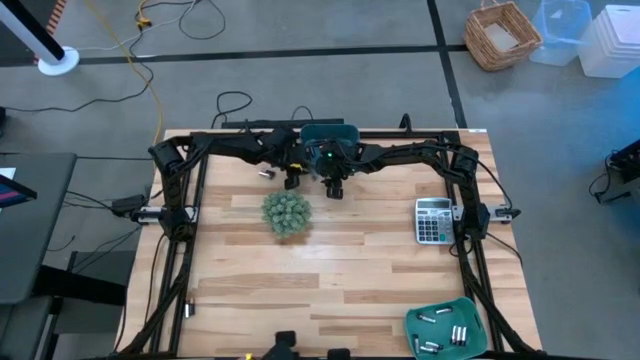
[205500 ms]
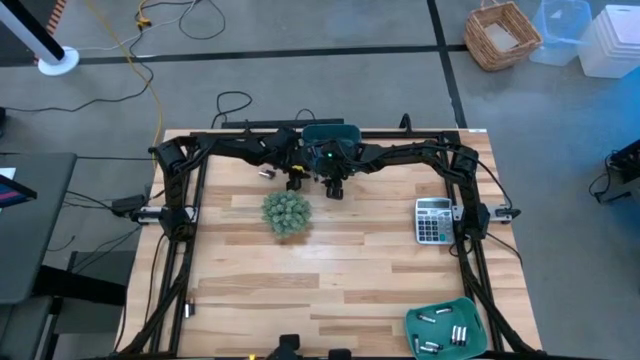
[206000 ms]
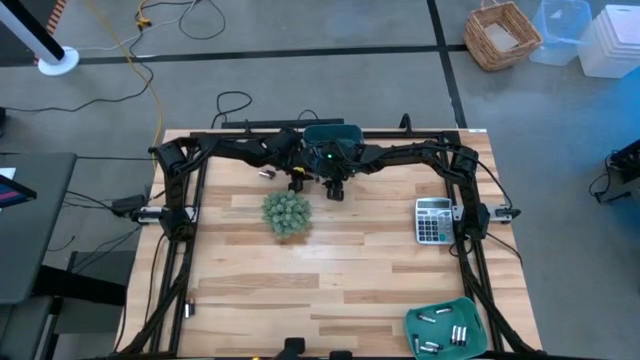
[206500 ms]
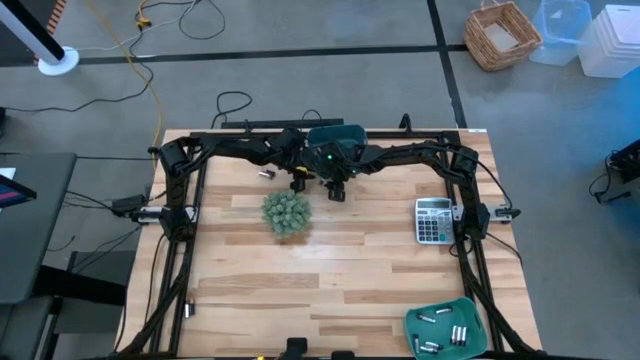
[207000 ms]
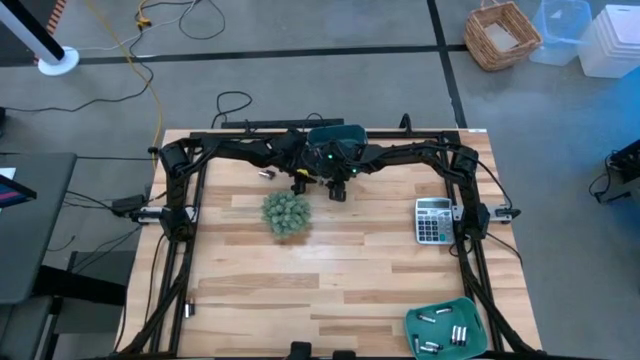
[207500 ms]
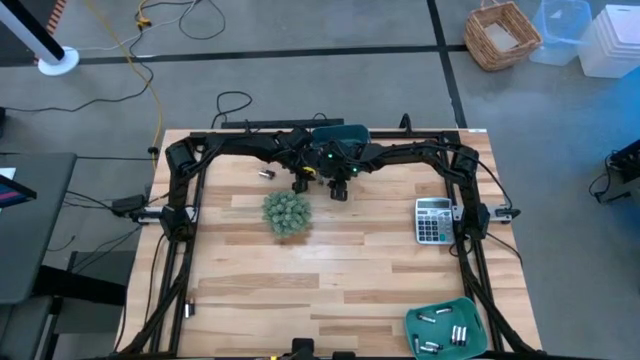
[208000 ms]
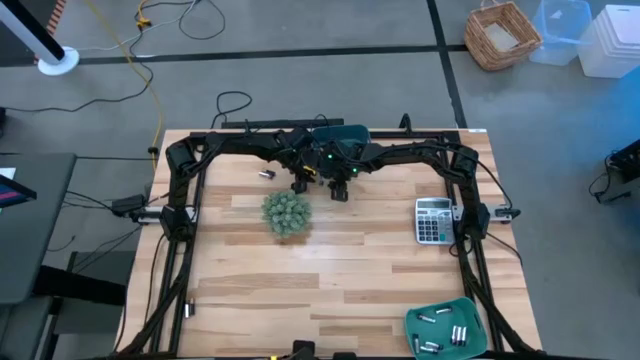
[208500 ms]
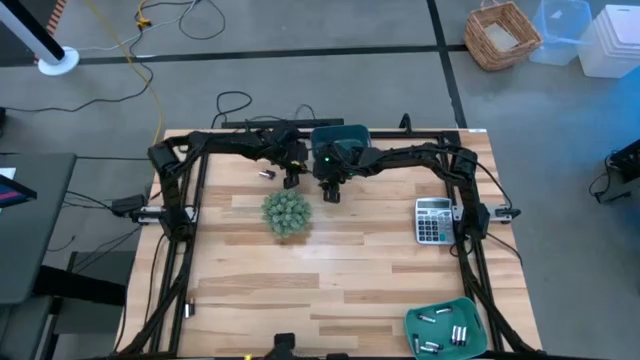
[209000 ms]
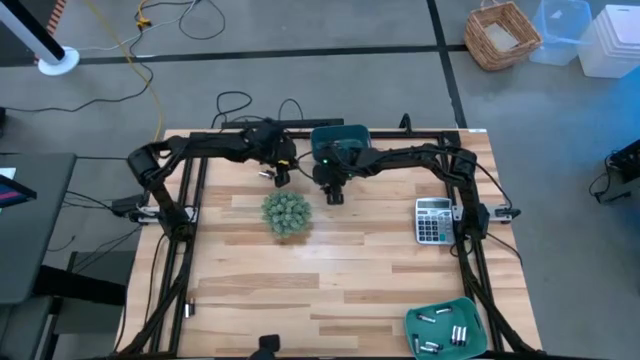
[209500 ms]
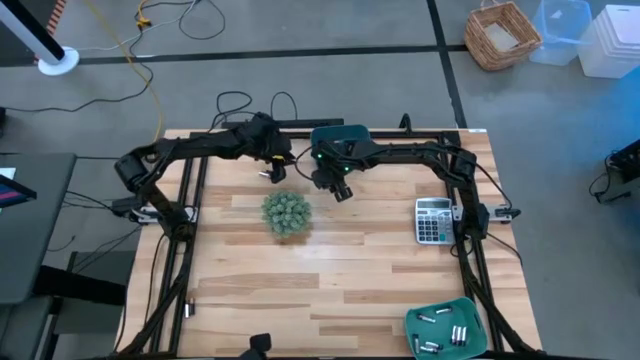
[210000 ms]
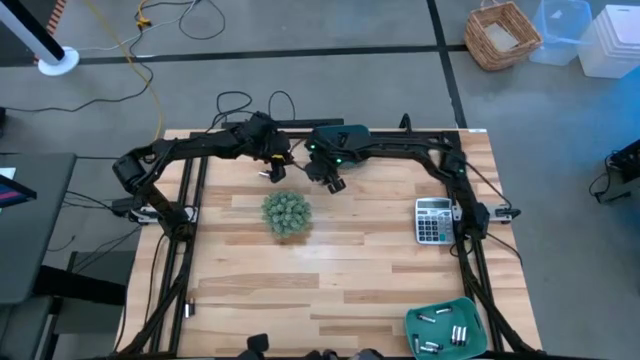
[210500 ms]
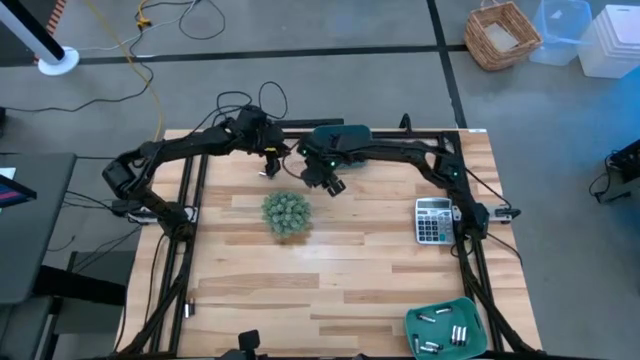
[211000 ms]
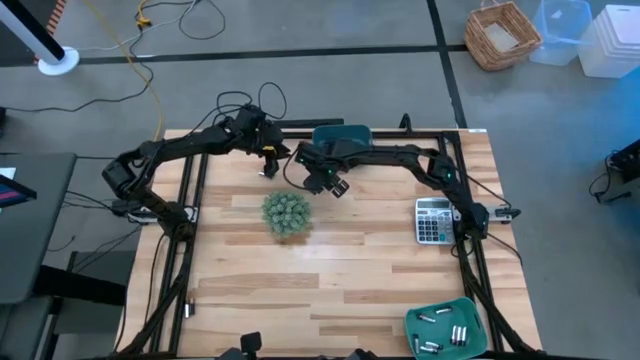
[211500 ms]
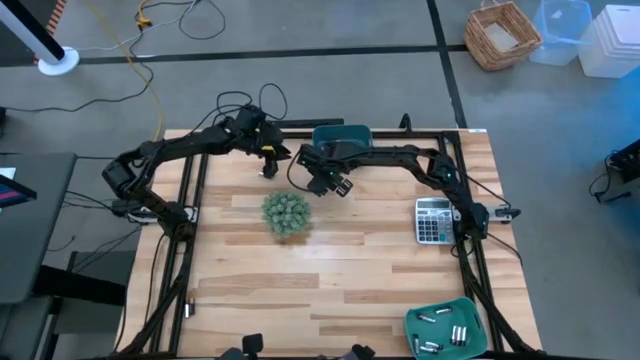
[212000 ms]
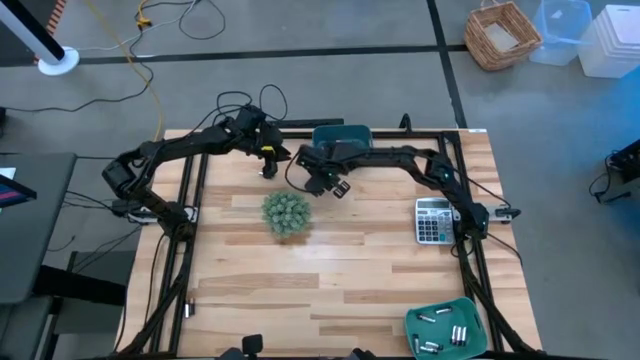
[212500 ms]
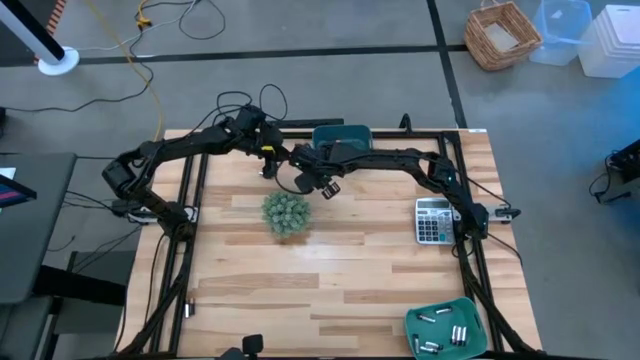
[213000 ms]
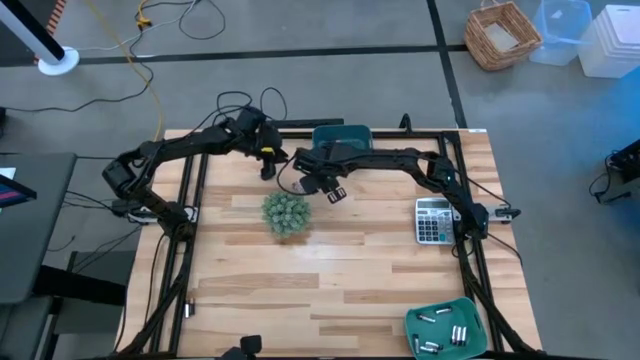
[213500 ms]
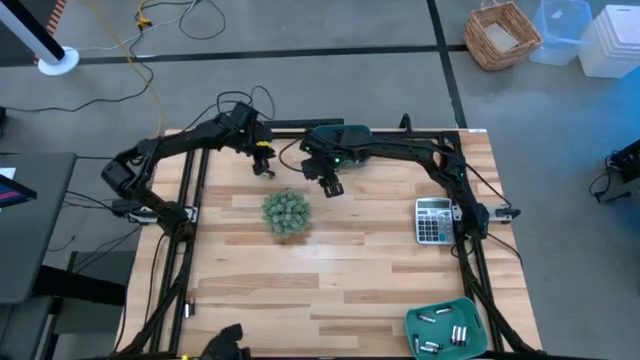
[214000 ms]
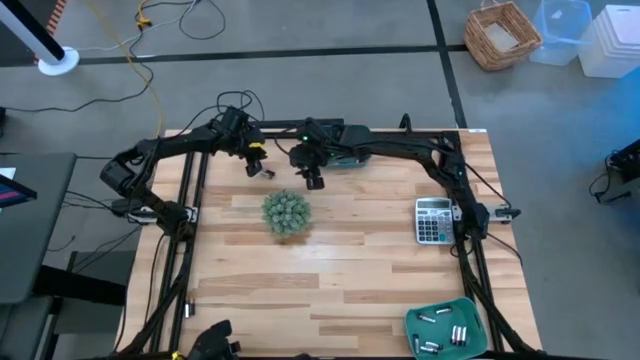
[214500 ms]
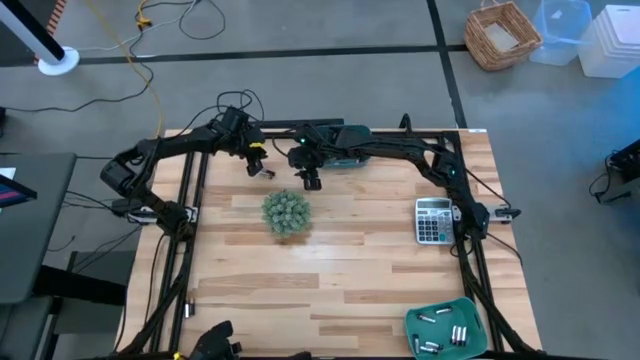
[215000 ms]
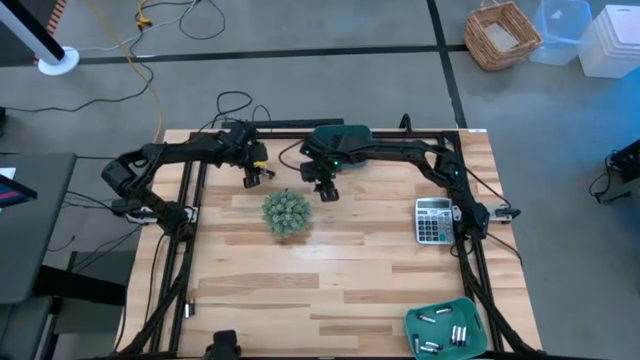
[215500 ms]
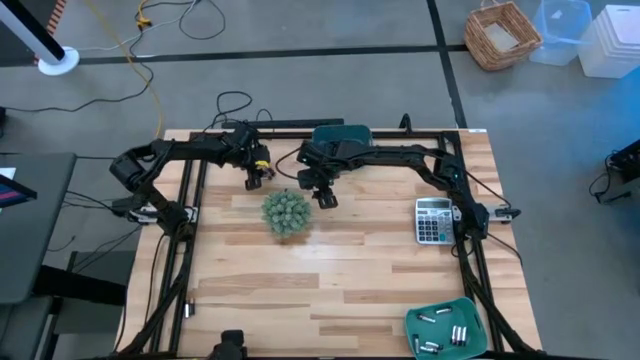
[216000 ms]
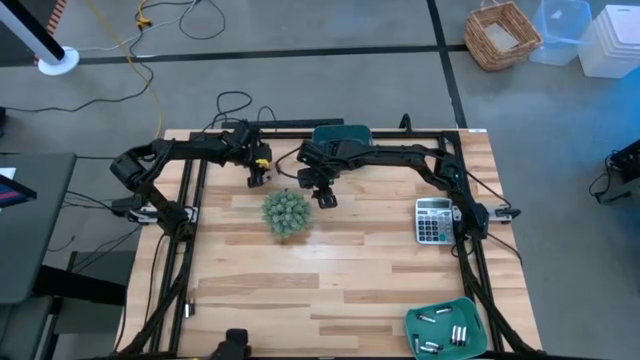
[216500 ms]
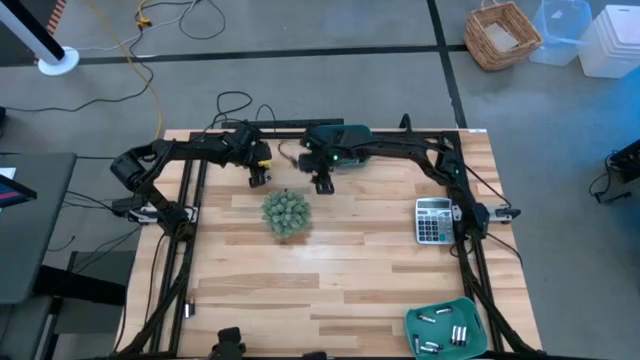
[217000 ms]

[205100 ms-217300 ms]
Task: Sort batteries
Put the silver battery into the green bin

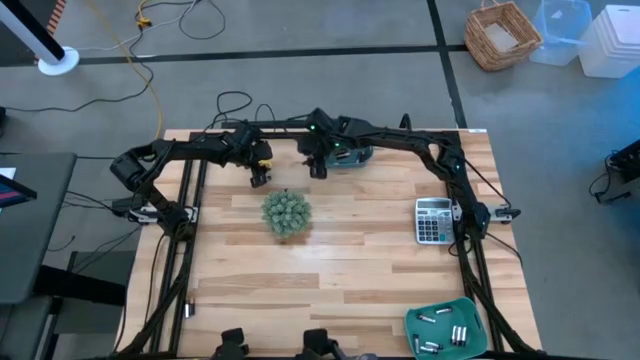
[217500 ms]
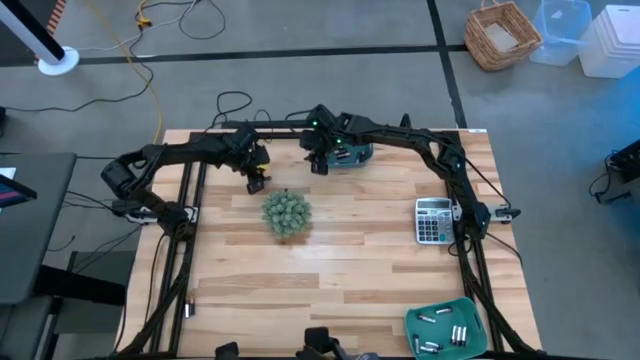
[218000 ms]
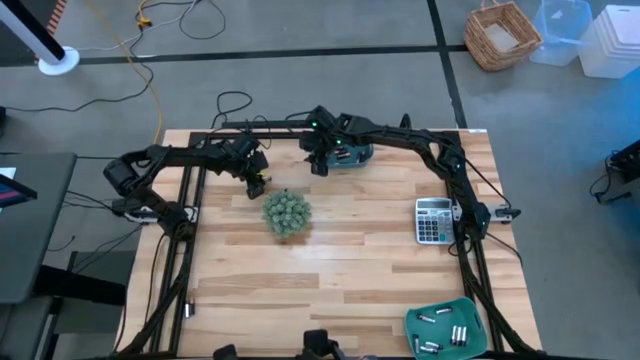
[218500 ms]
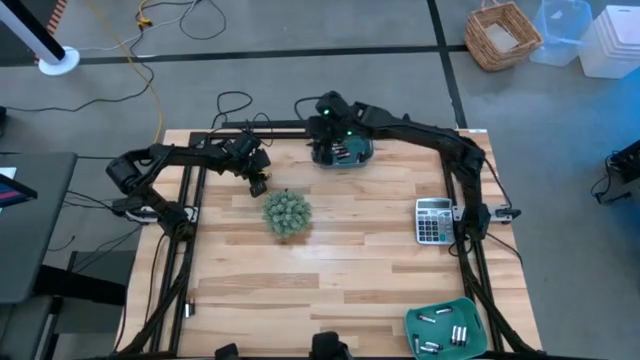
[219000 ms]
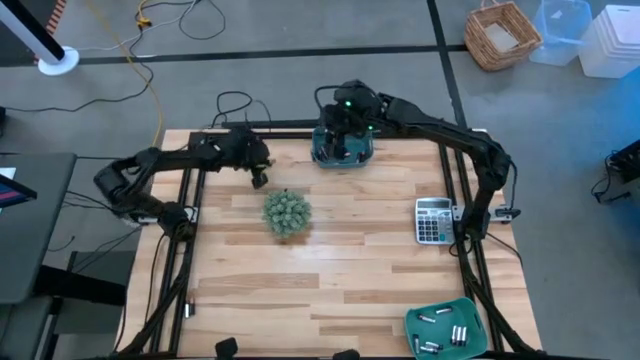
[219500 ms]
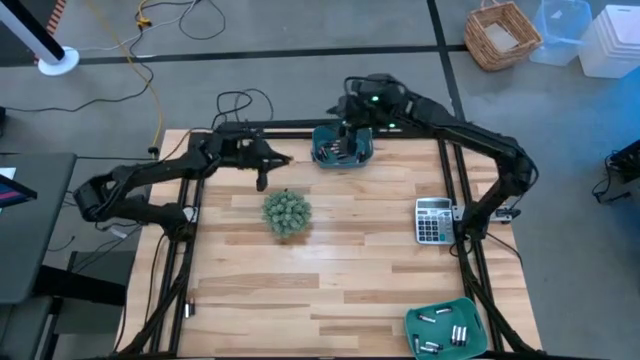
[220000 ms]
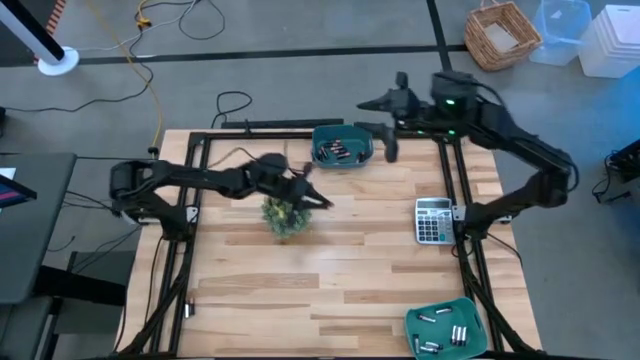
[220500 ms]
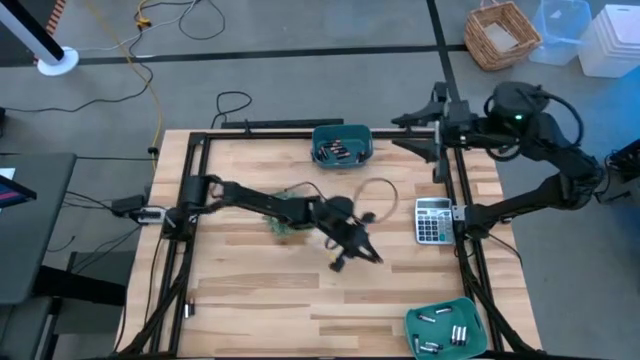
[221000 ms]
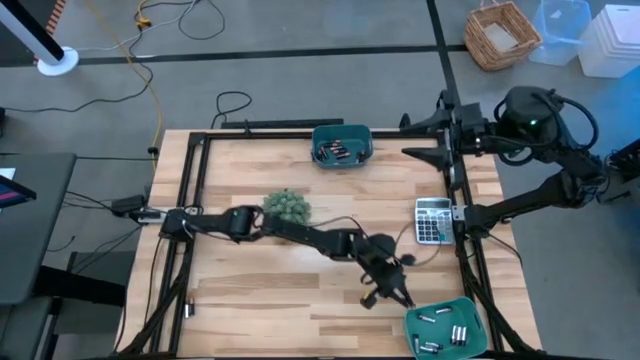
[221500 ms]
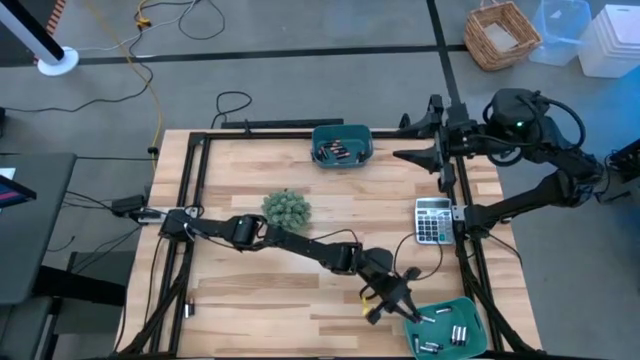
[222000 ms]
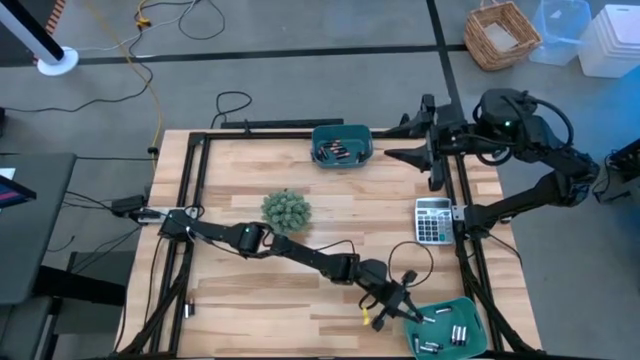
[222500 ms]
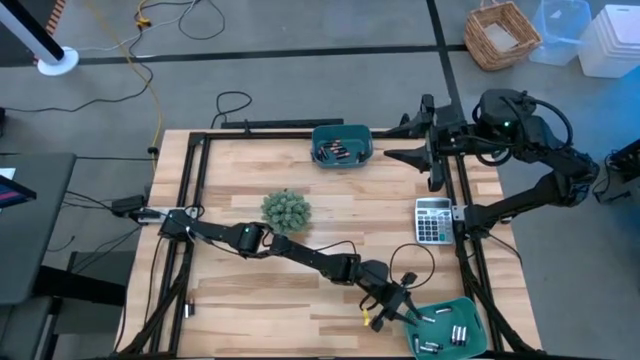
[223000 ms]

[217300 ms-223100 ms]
Put the silver battery into the green bin

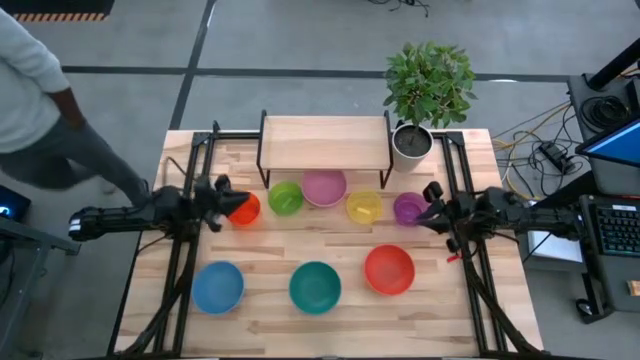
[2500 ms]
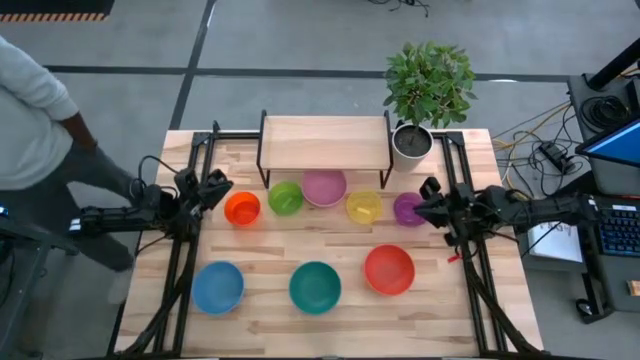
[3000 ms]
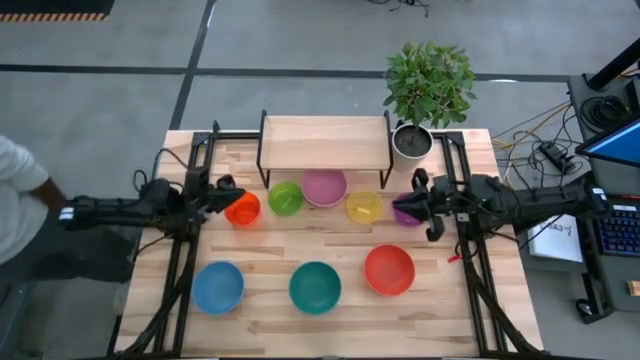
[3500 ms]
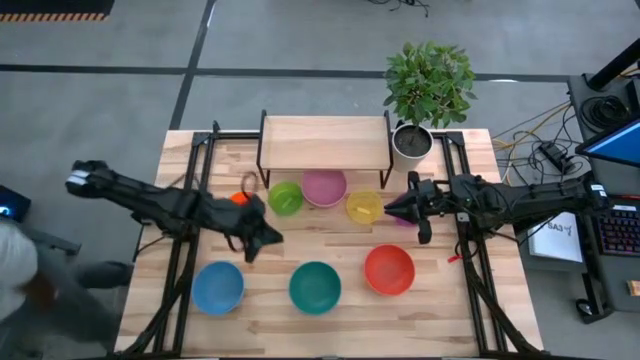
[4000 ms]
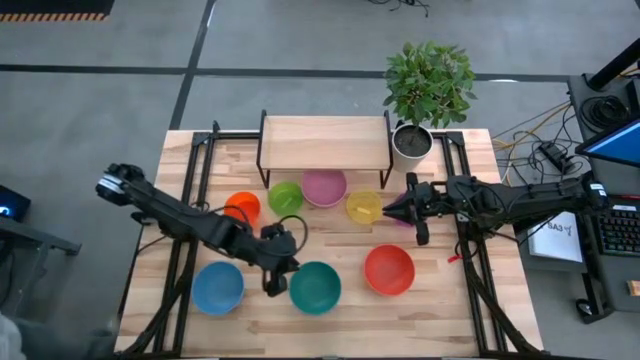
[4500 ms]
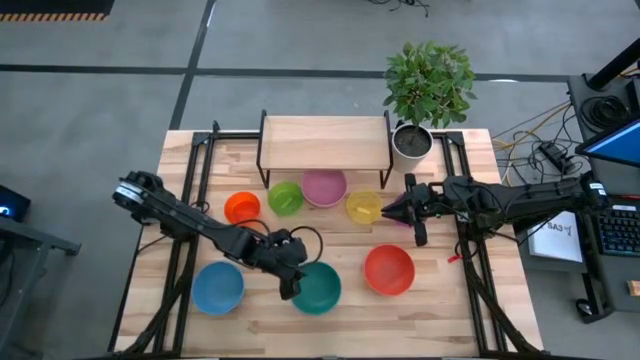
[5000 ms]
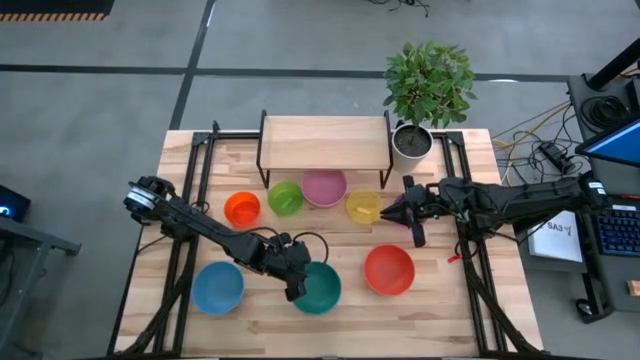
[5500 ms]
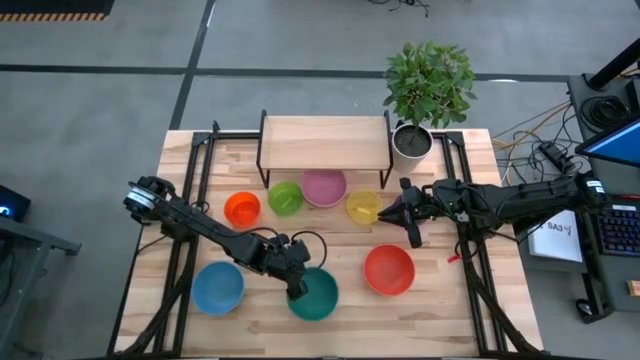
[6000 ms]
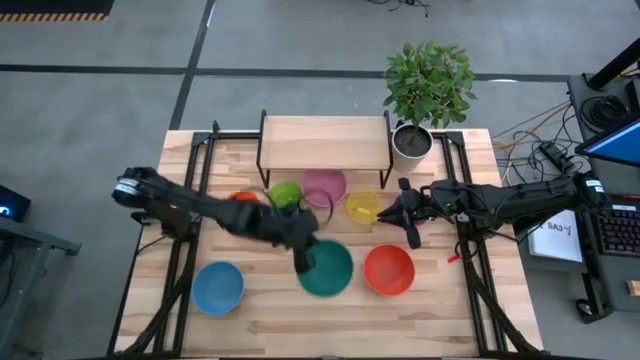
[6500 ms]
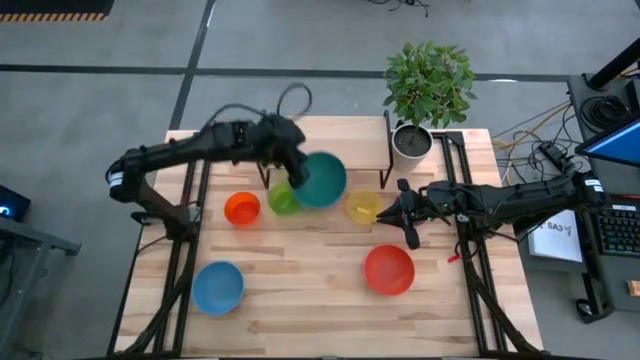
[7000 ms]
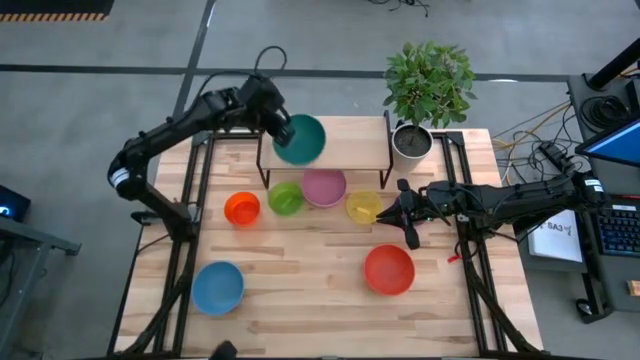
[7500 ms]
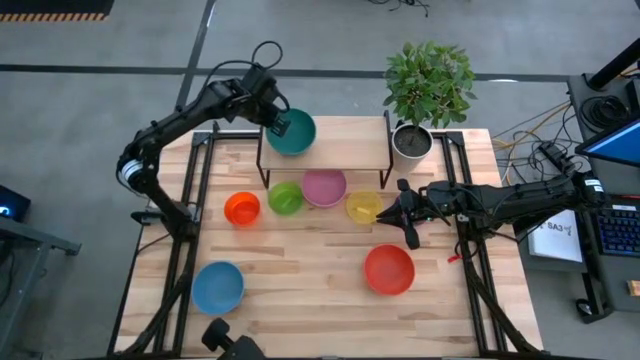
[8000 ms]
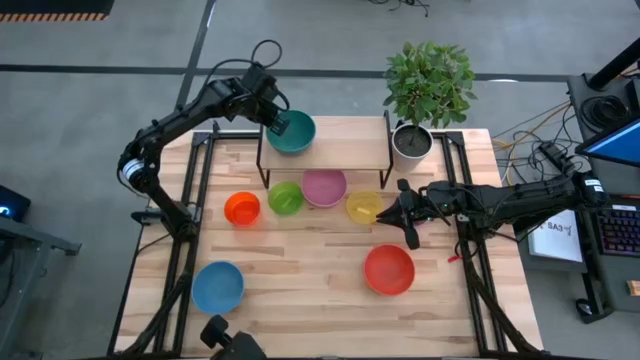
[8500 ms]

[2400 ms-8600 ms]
Task: Place and stack bowls onto a shelf
Put the dark green bowl on the shelf
